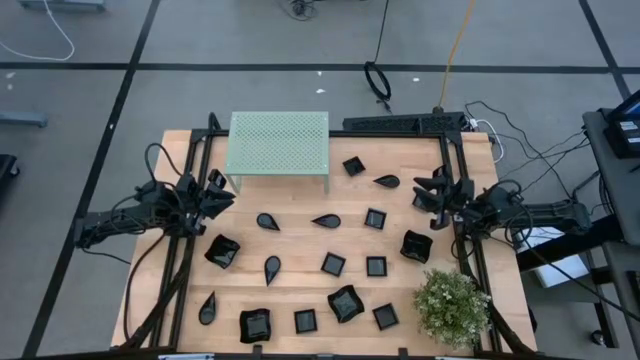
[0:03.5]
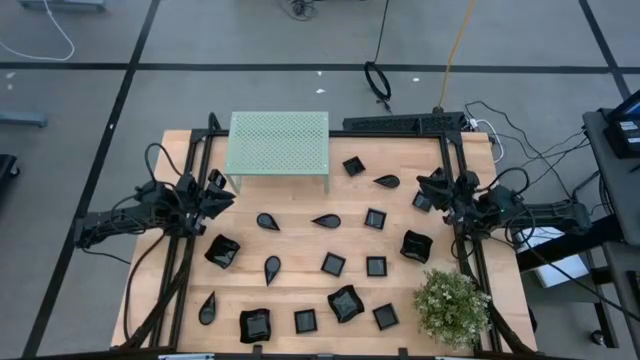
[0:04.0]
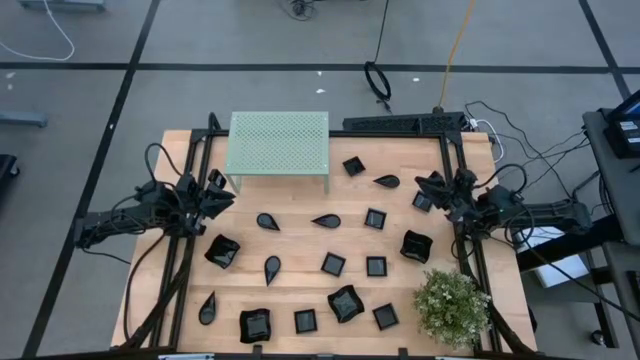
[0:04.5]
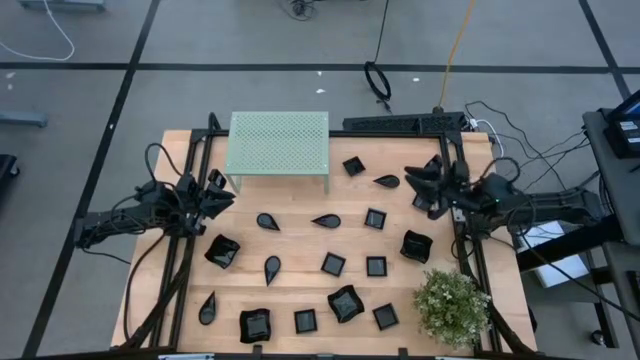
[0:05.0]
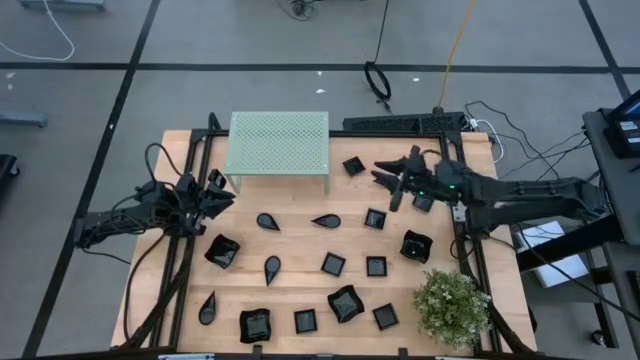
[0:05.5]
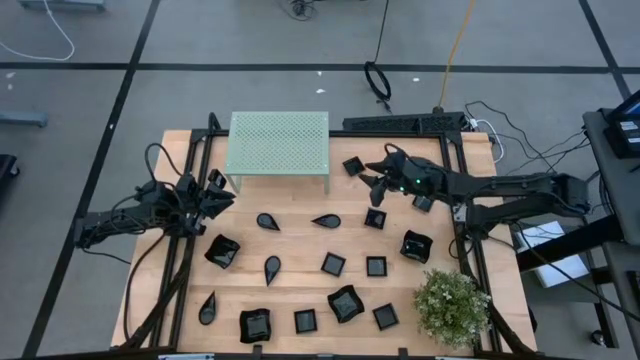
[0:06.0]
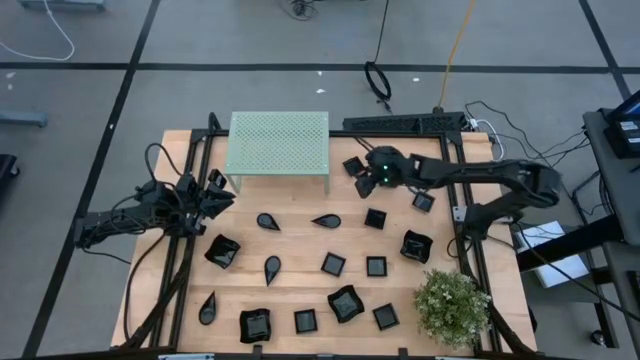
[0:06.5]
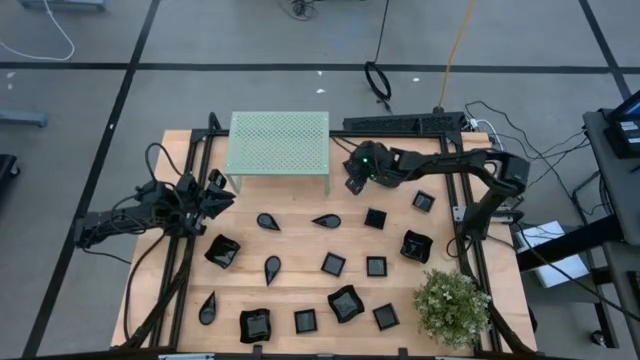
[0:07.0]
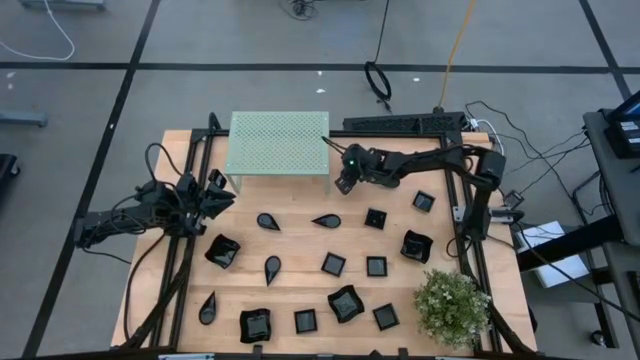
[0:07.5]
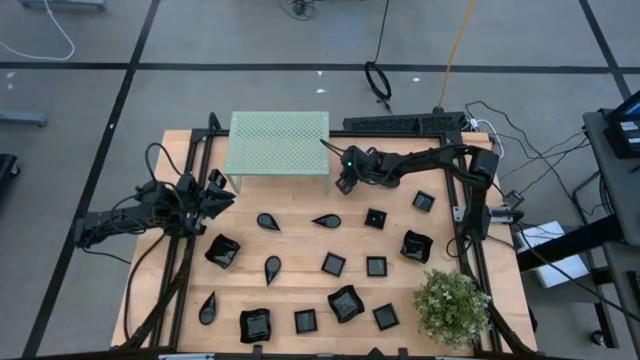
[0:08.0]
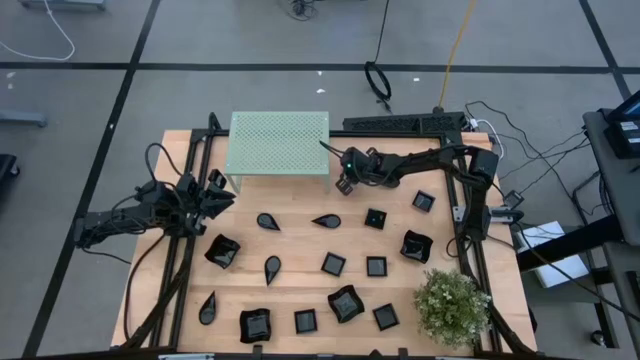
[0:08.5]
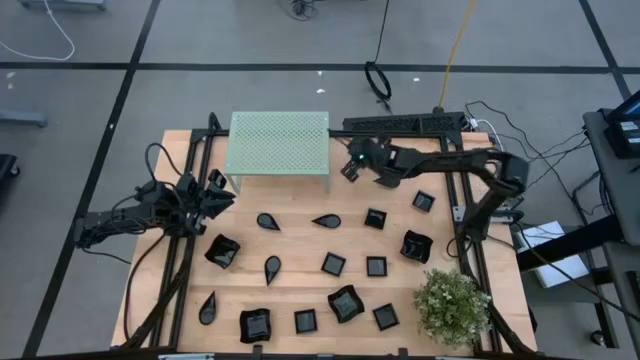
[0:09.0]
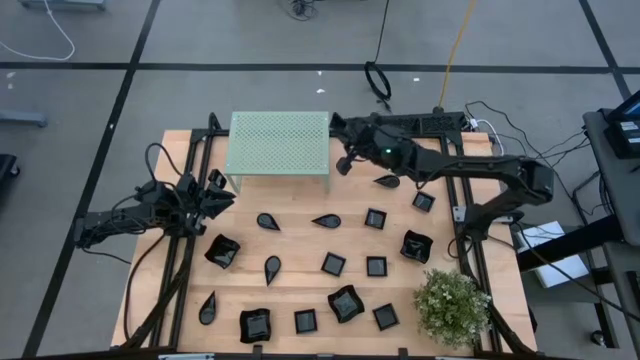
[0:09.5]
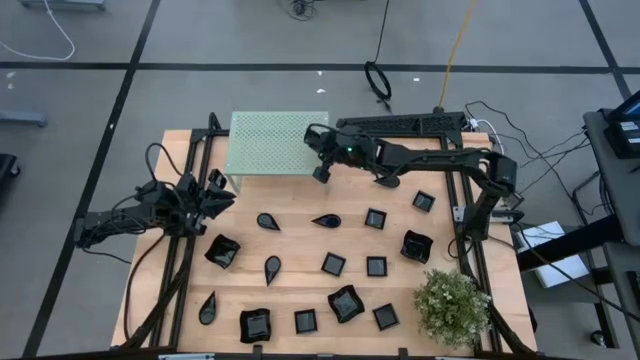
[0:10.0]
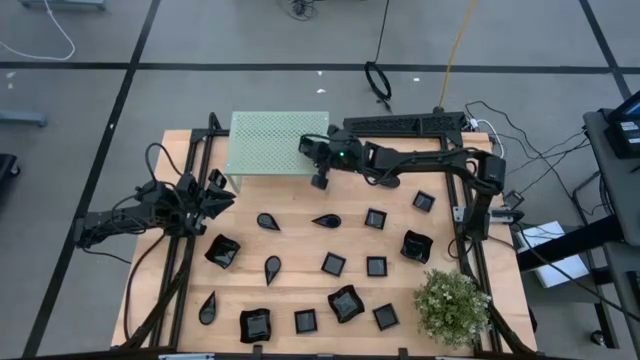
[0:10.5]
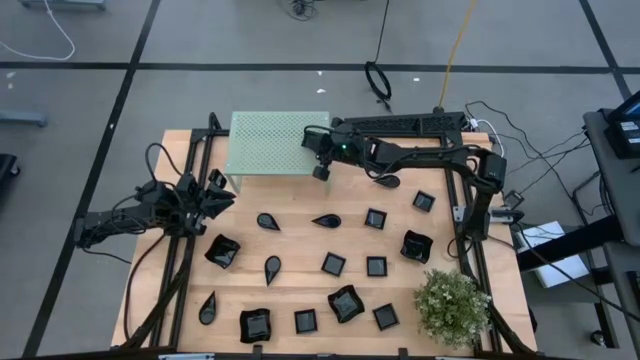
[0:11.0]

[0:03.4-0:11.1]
Task: Pick & Place Mini shaped plates
Put the square plate on the shelf

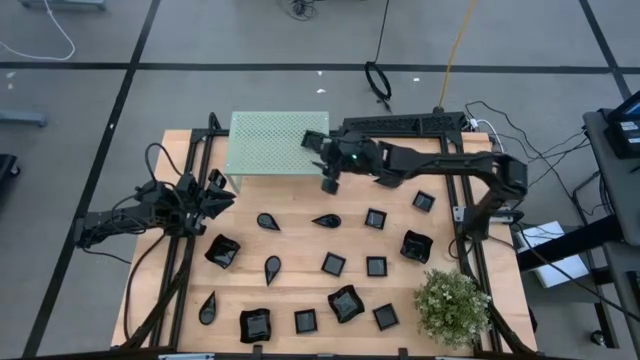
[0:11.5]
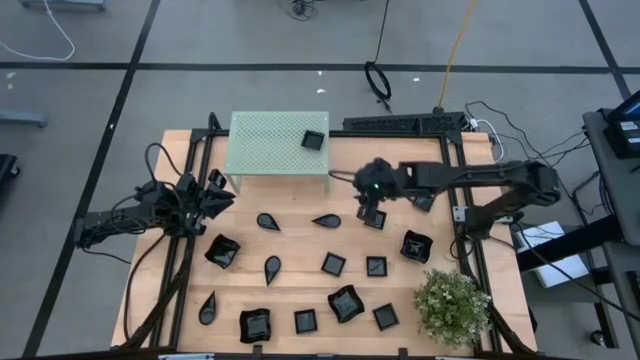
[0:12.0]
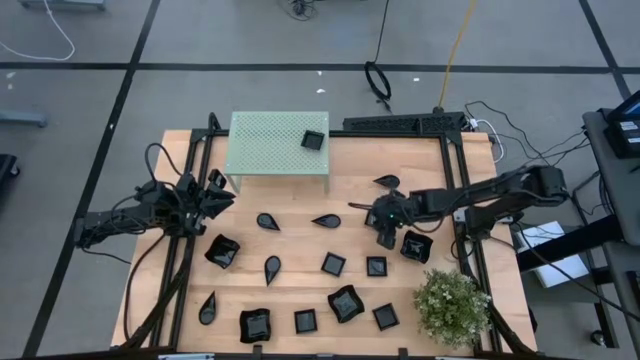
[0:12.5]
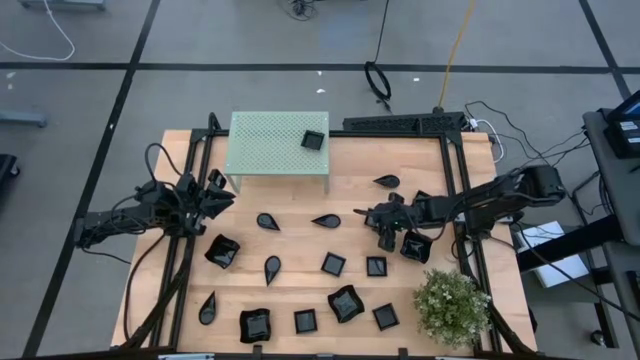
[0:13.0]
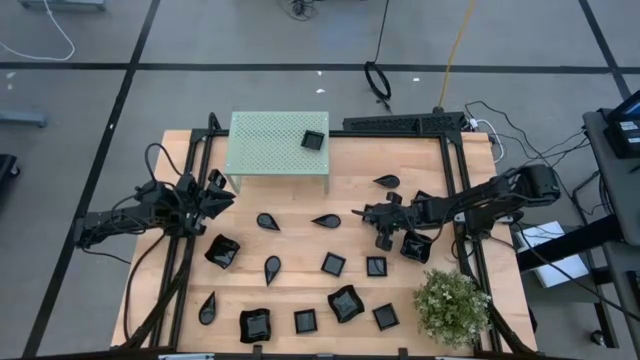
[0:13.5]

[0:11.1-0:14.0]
Stack the square plate on top of the square plate on the shelf

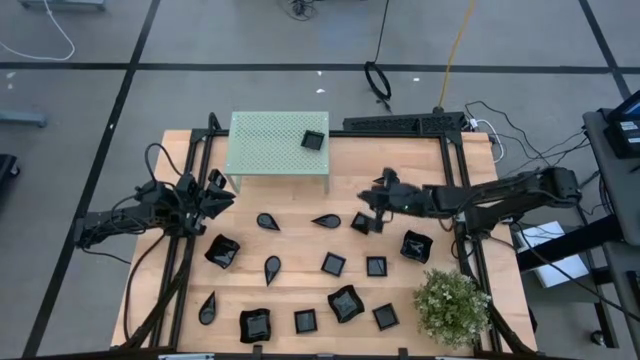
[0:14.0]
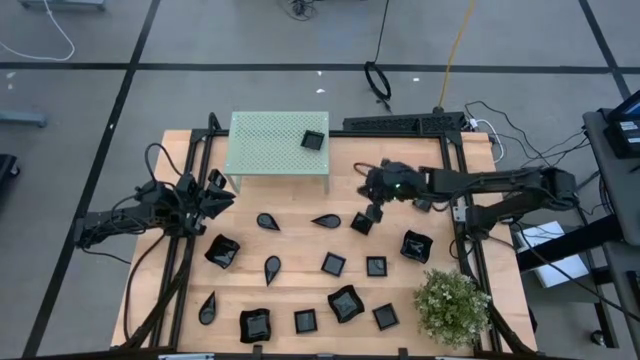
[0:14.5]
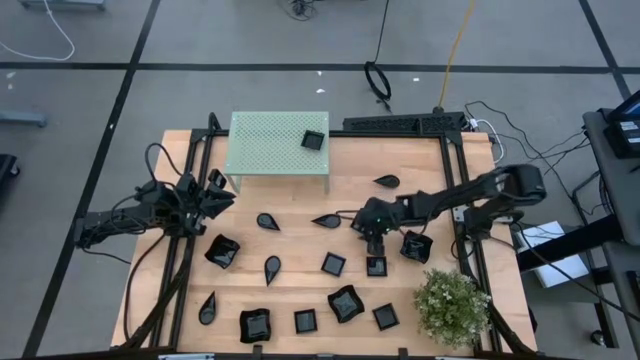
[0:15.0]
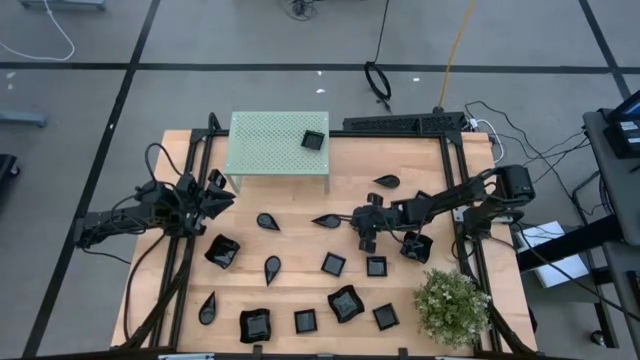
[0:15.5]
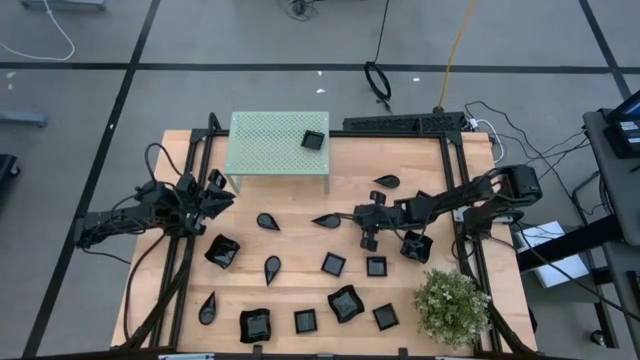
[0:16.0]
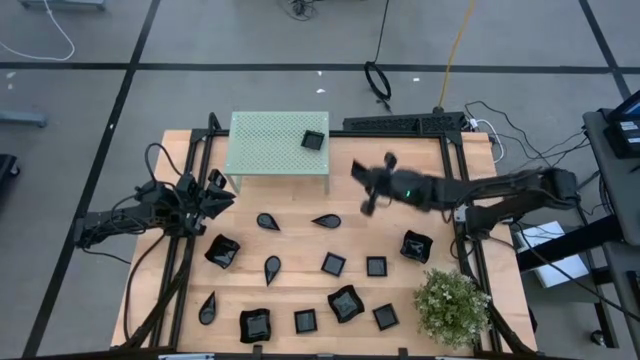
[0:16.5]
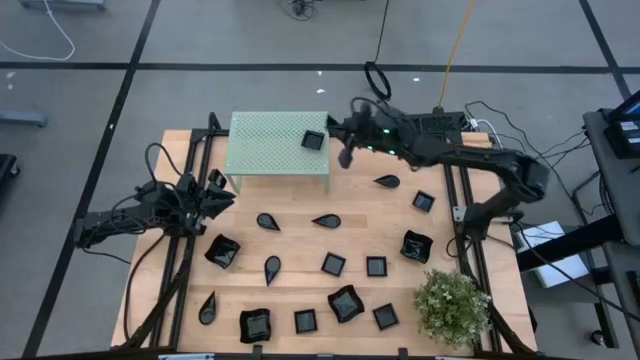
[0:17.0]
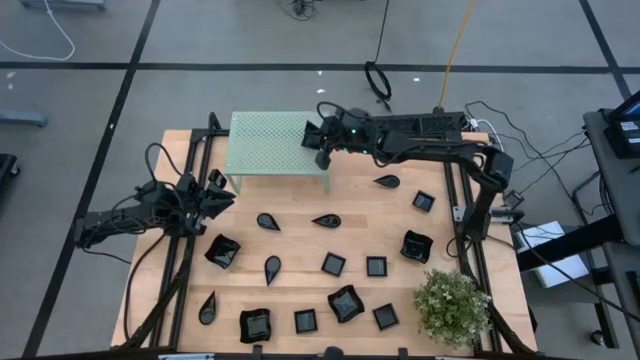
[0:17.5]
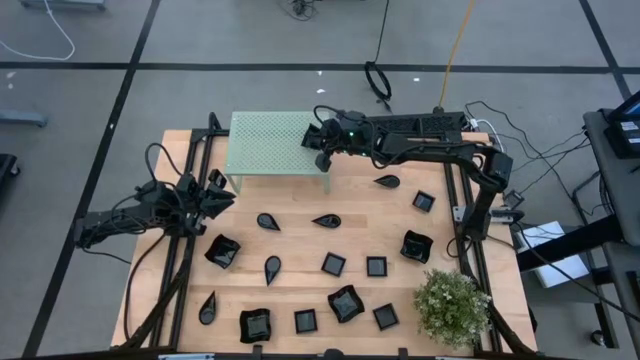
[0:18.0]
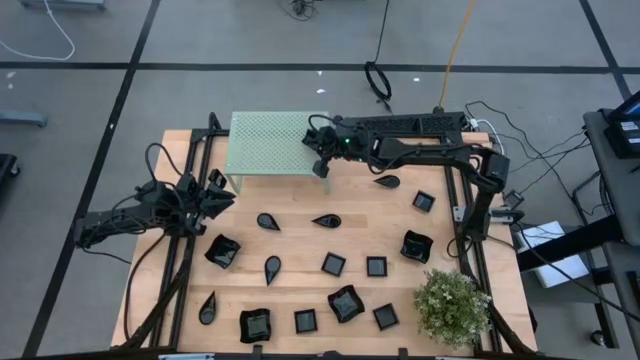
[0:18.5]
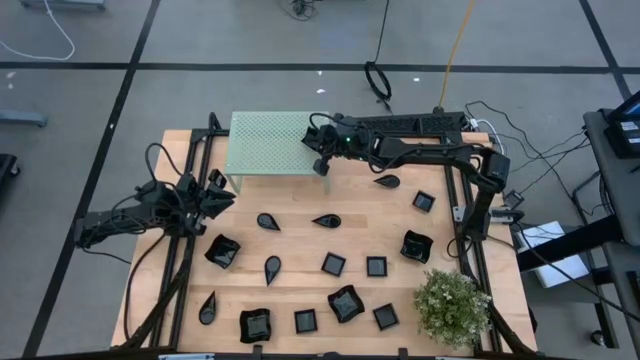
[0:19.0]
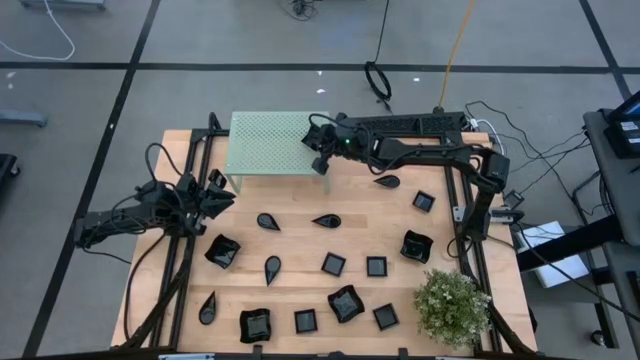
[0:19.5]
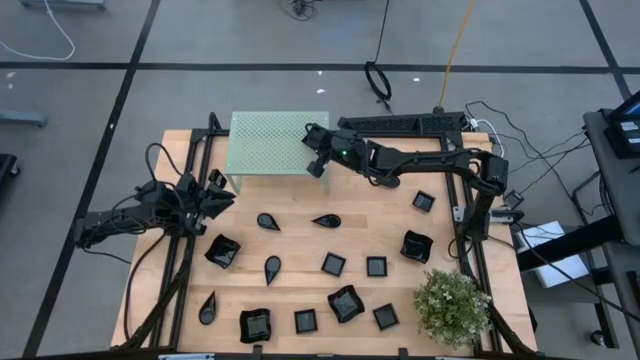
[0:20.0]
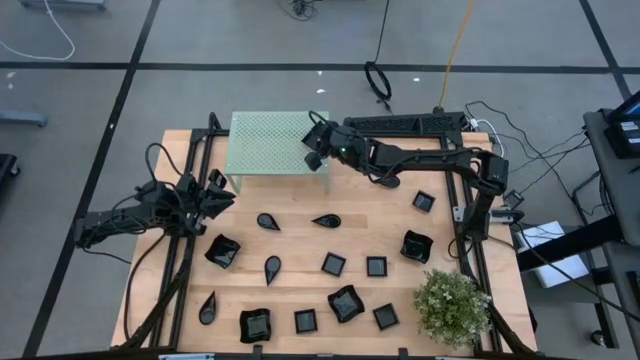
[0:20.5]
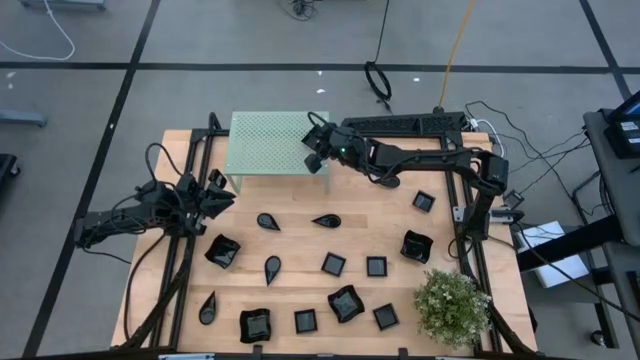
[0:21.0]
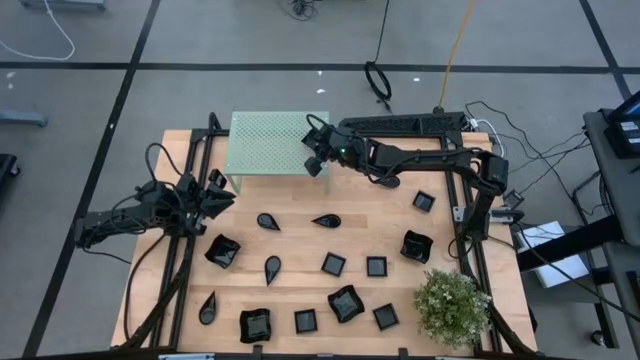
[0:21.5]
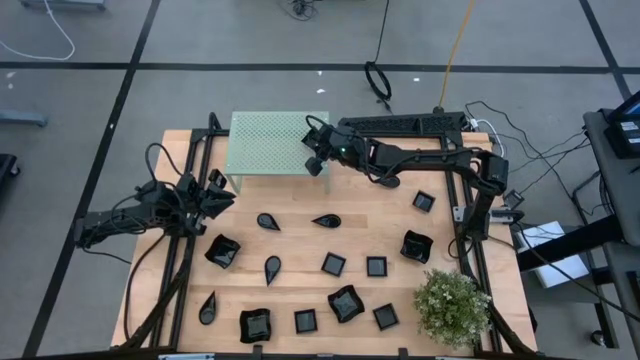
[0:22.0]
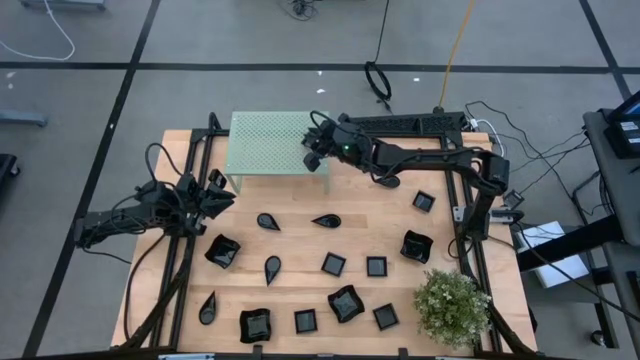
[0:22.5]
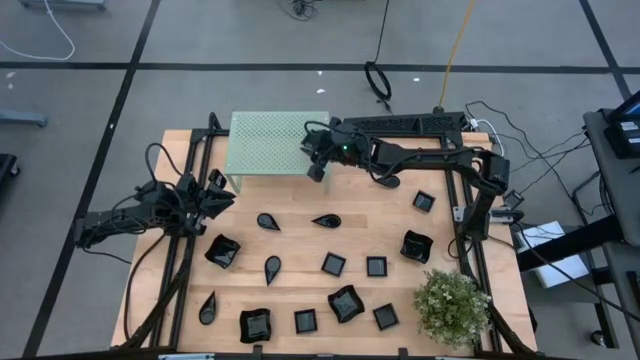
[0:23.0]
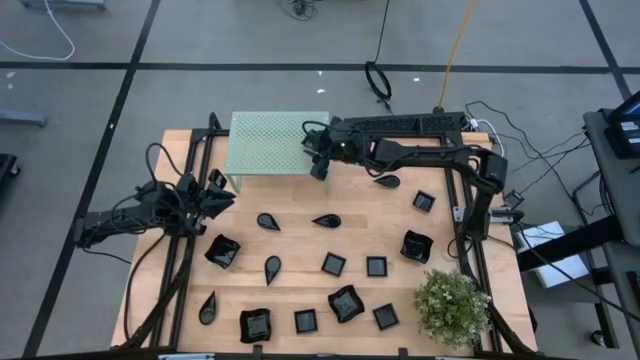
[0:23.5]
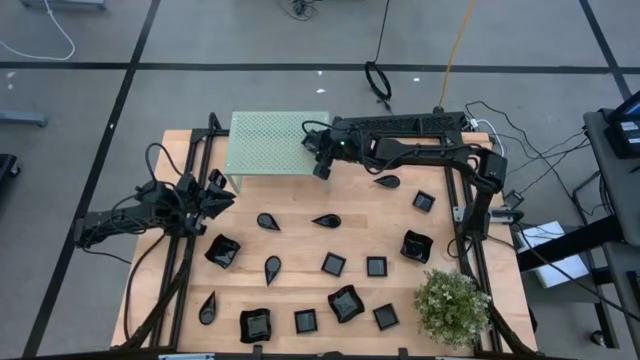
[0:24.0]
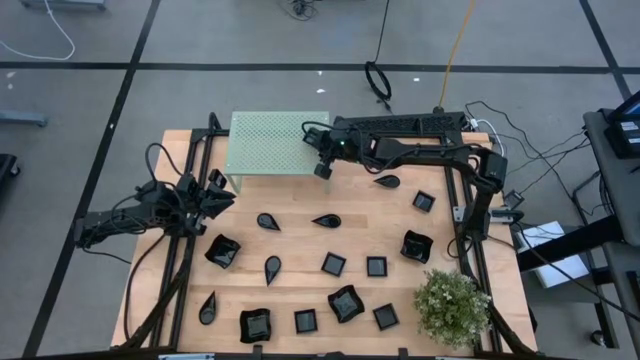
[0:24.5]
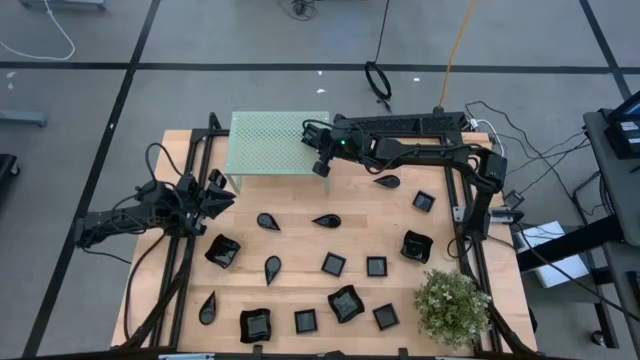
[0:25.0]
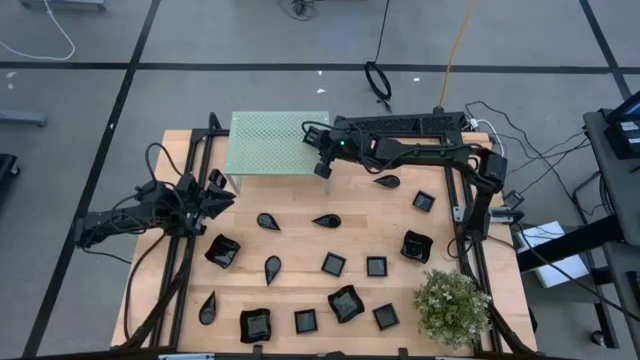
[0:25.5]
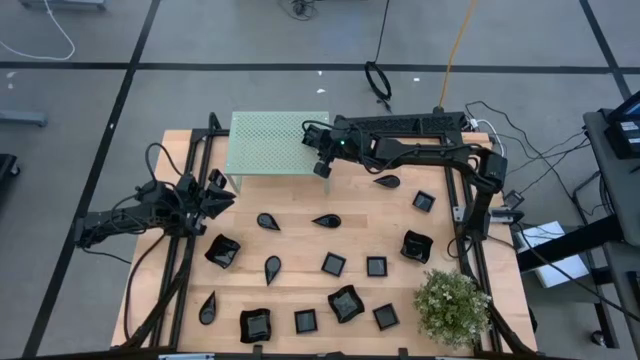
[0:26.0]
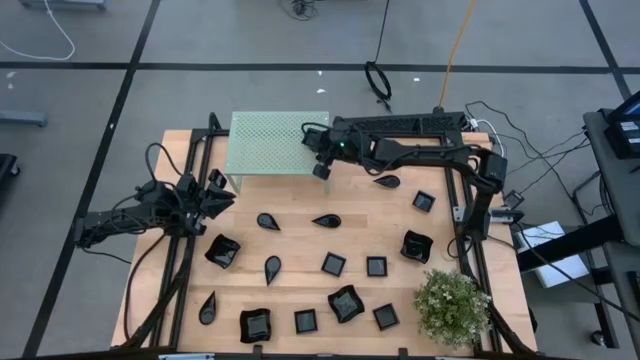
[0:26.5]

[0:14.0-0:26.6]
Stack the square plate on top of the square plate on the shelf
